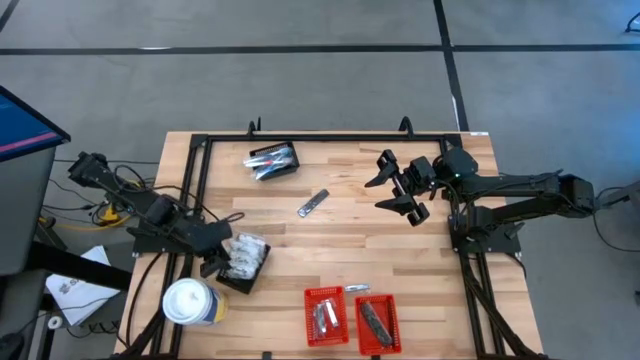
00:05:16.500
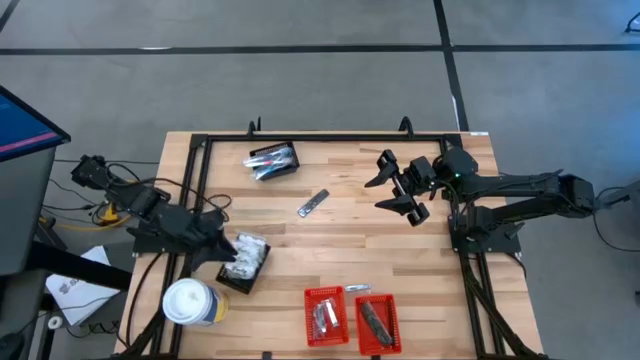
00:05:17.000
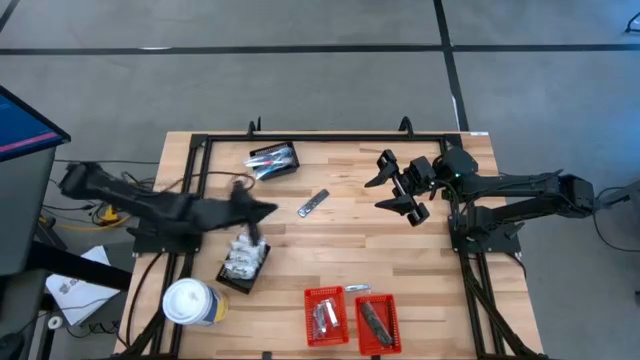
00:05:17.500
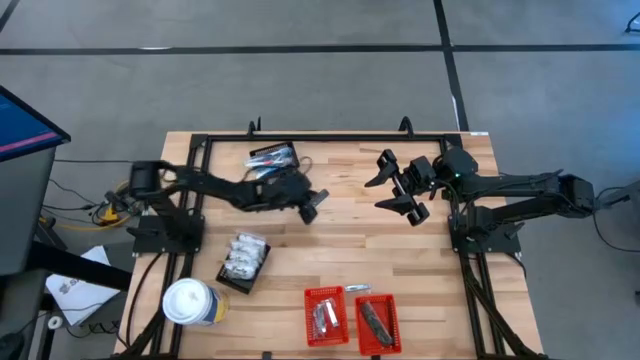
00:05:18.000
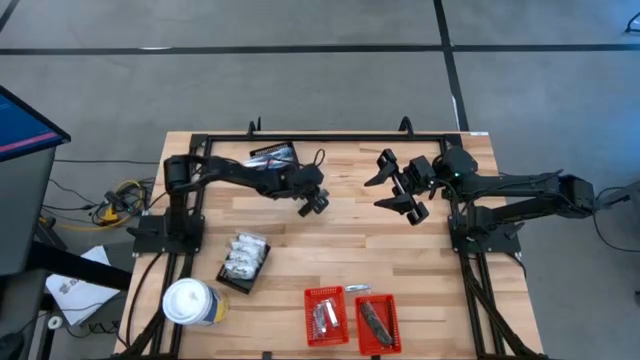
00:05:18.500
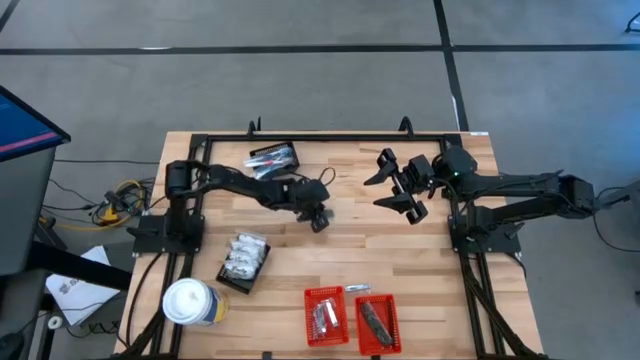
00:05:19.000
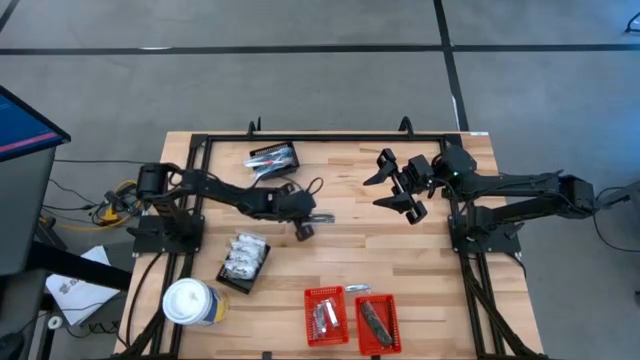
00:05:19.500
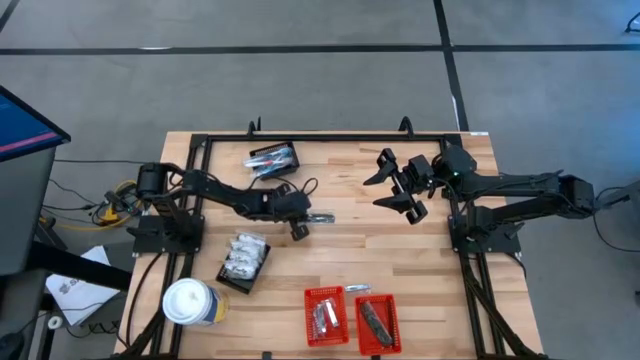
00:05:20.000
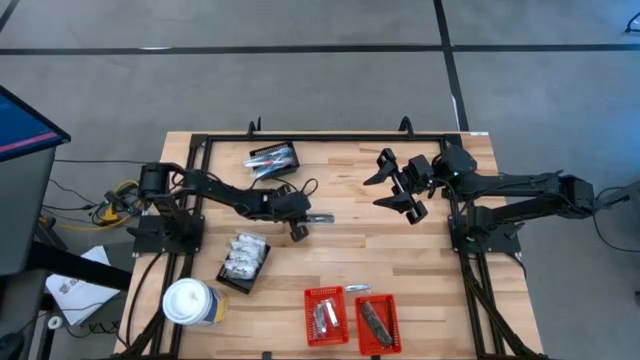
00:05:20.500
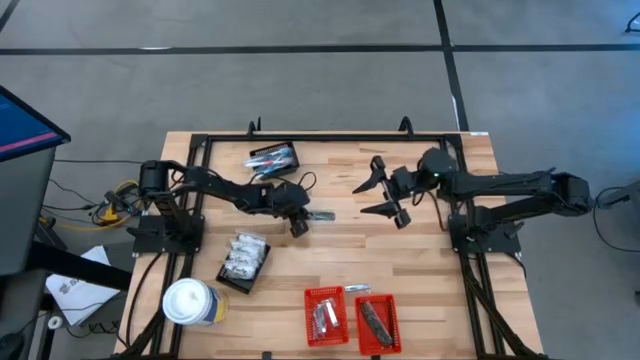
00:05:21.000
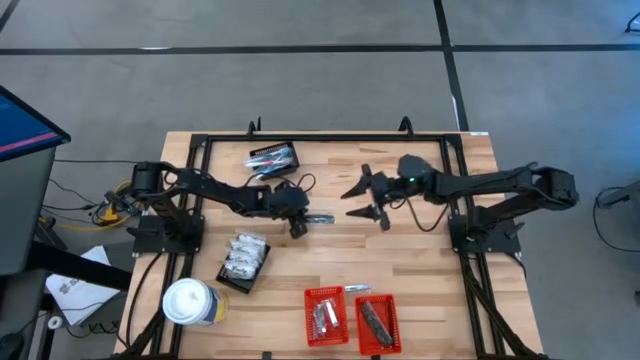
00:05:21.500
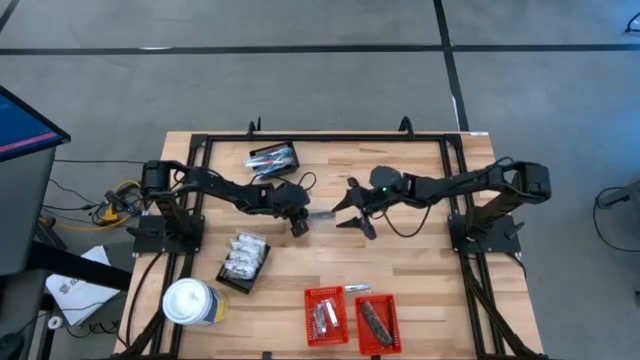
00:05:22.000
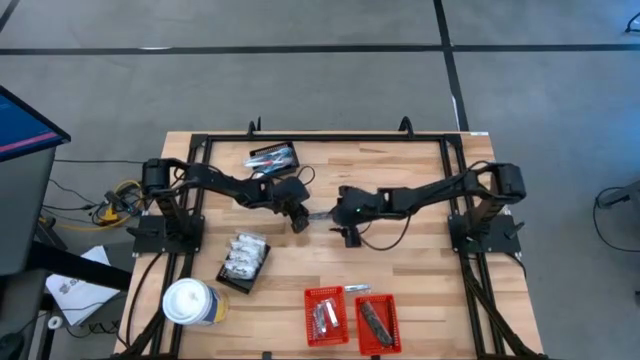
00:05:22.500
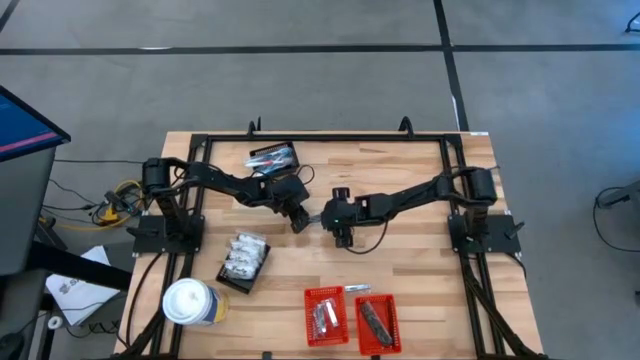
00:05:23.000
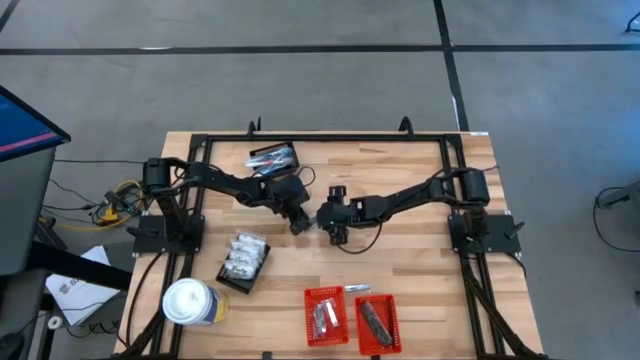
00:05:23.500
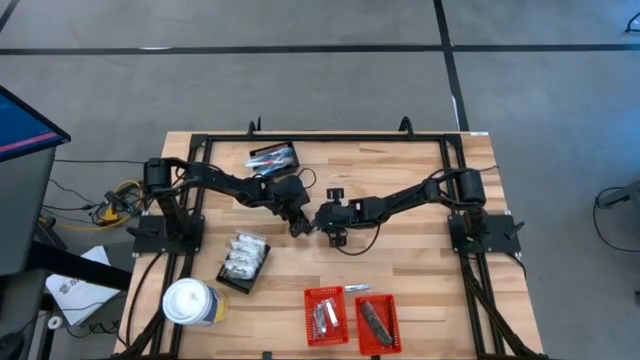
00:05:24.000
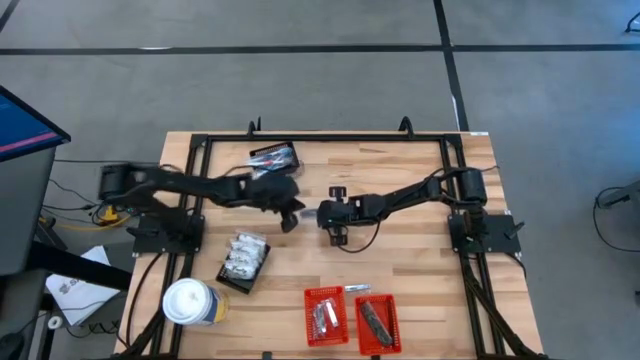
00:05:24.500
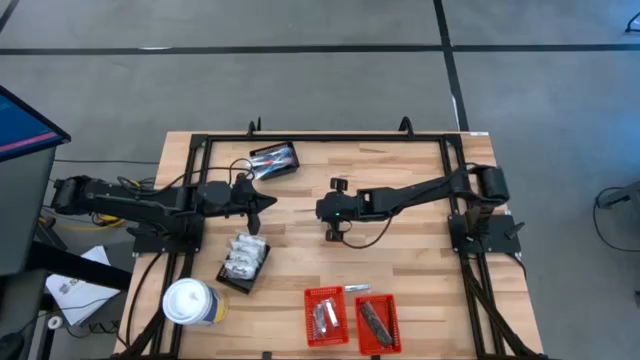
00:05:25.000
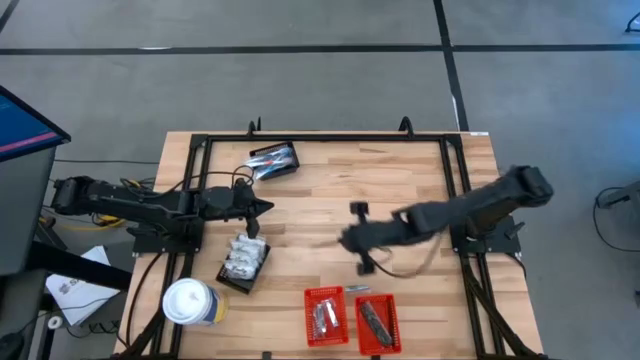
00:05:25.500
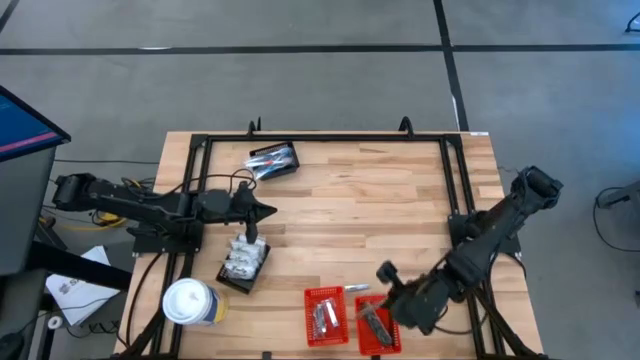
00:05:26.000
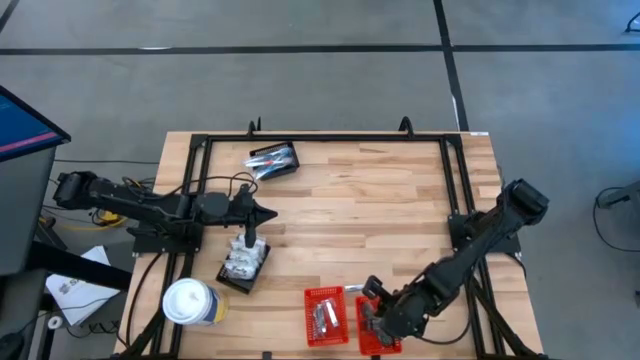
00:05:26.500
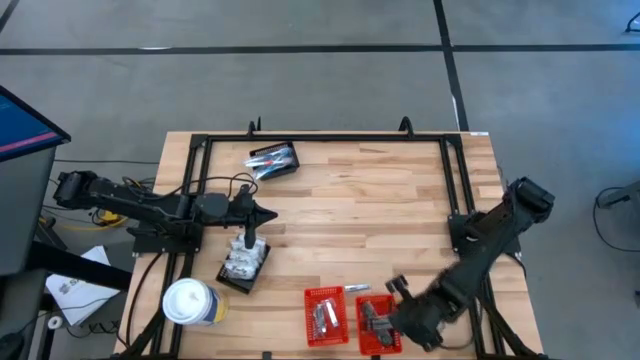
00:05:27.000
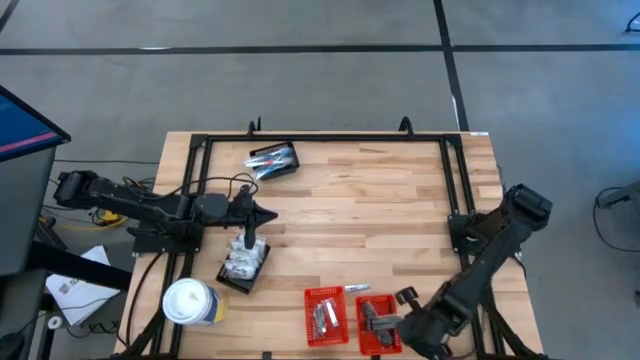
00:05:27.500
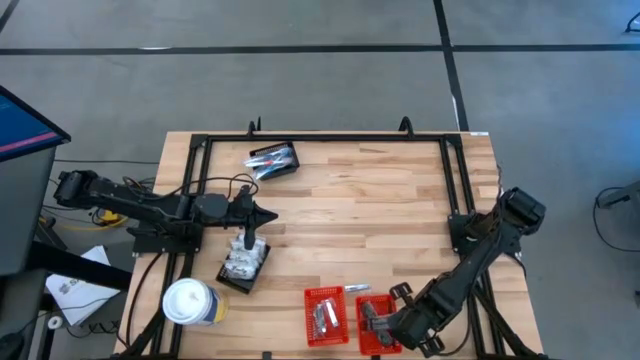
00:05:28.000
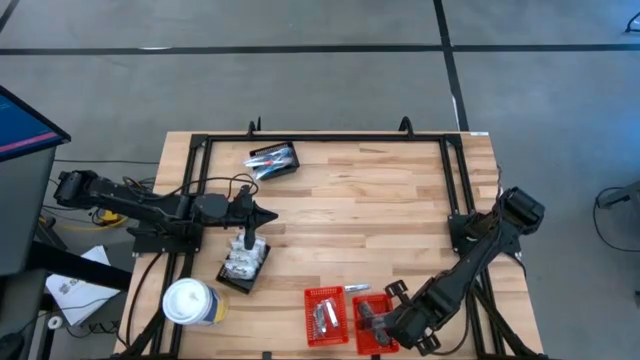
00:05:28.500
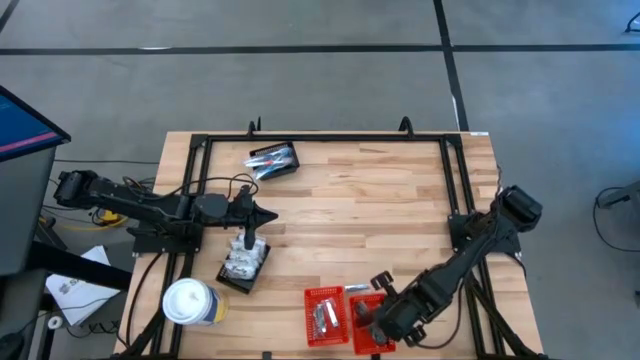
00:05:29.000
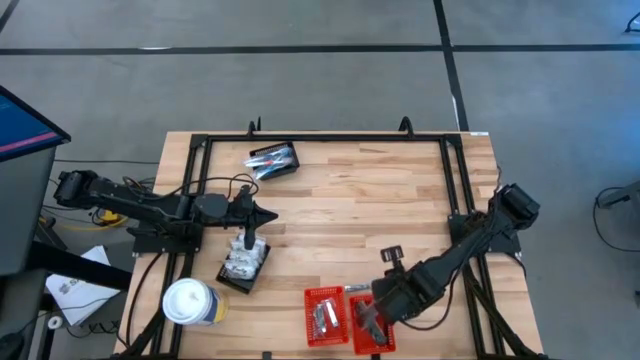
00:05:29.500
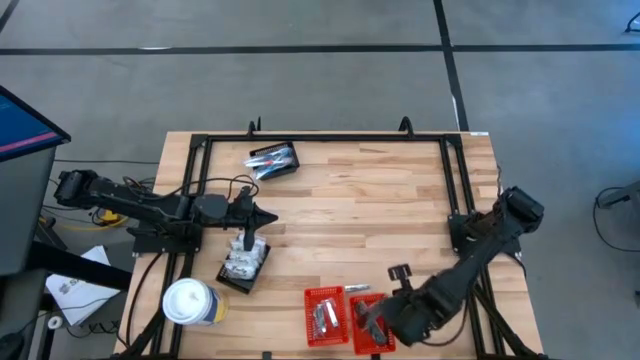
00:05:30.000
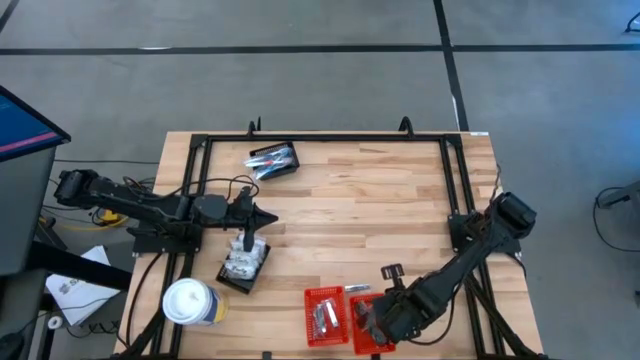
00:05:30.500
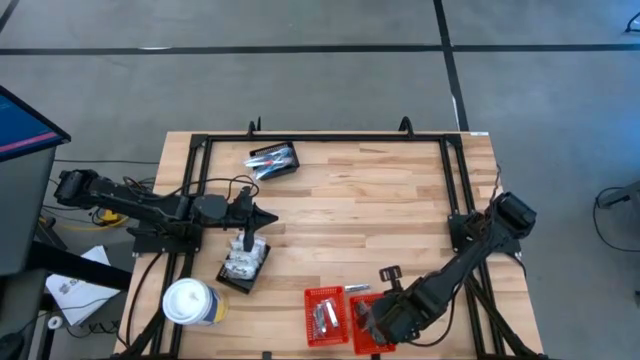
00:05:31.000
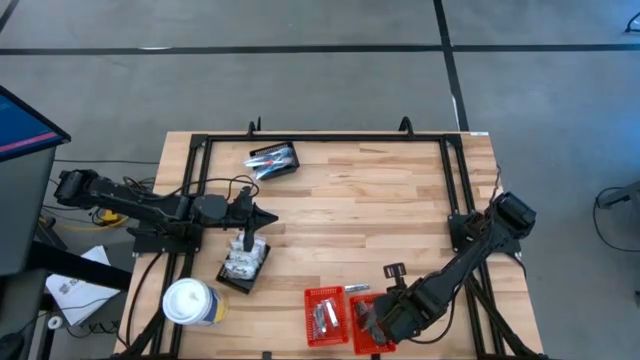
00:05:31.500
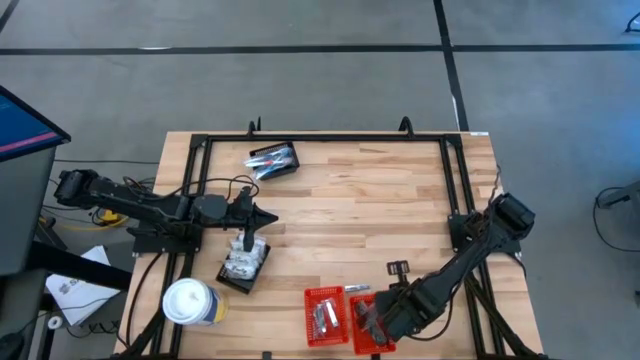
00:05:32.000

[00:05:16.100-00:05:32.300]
Task: Pick & Place Travel size toiletries
Put the black hair brush into the right red bin

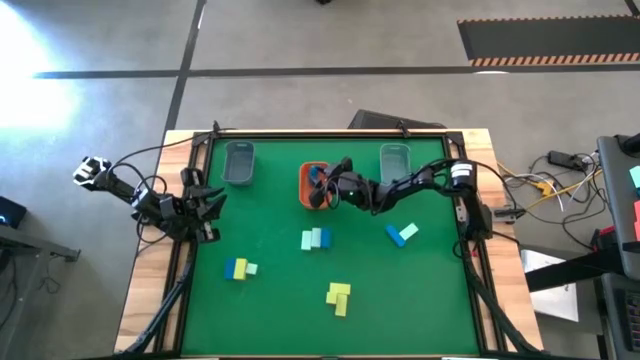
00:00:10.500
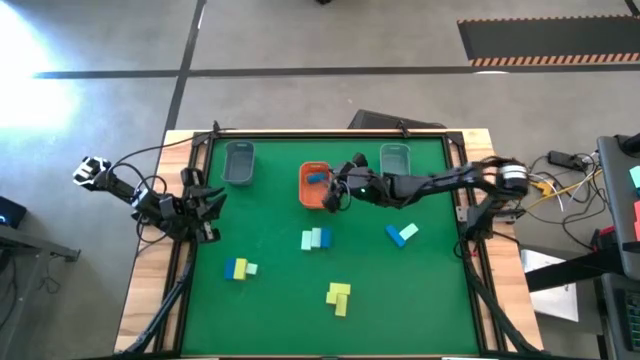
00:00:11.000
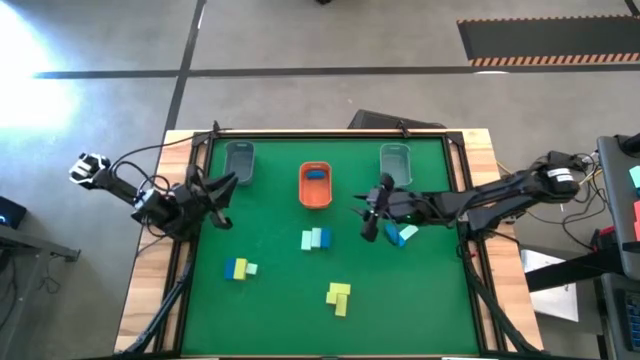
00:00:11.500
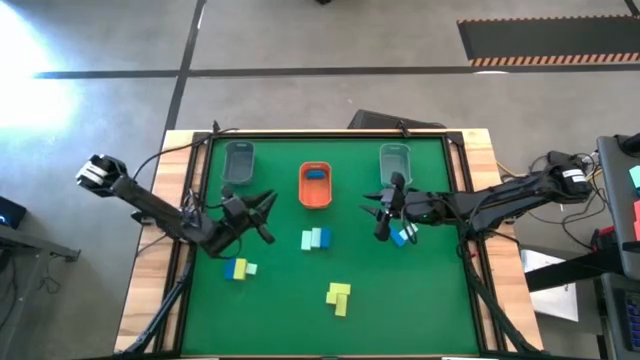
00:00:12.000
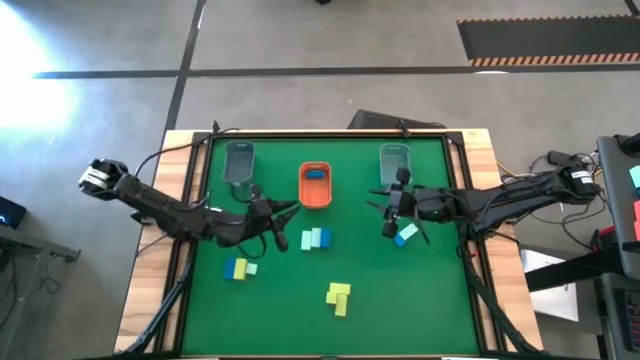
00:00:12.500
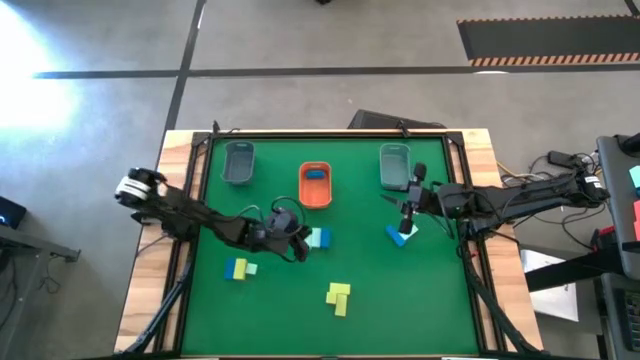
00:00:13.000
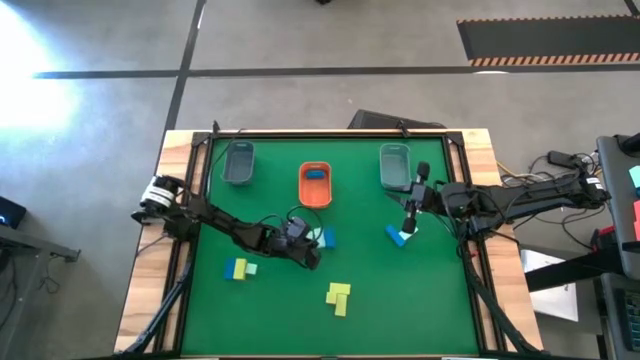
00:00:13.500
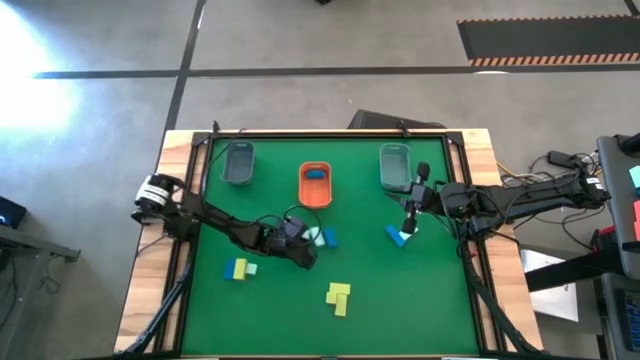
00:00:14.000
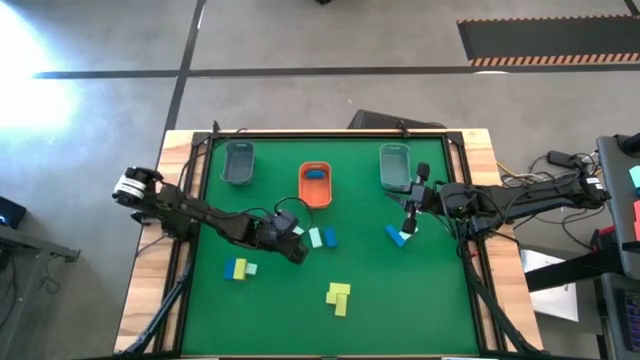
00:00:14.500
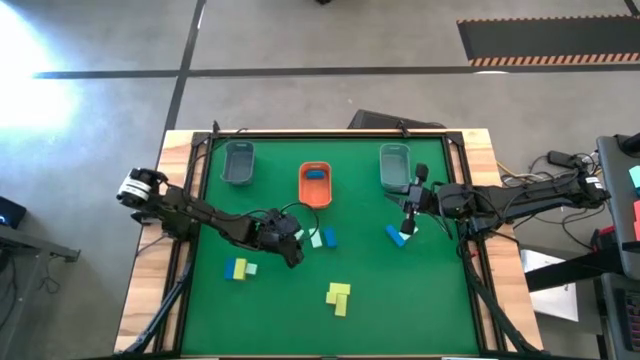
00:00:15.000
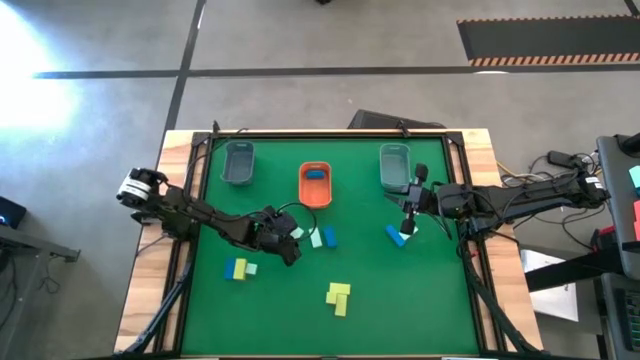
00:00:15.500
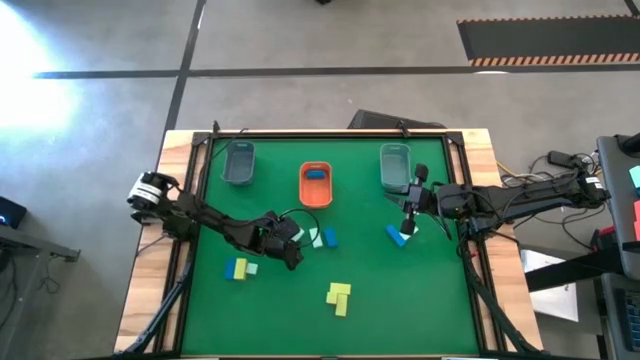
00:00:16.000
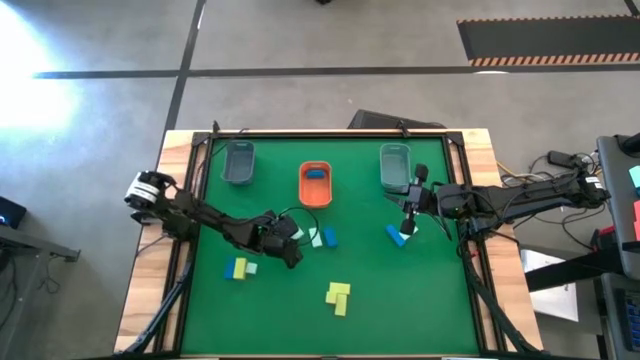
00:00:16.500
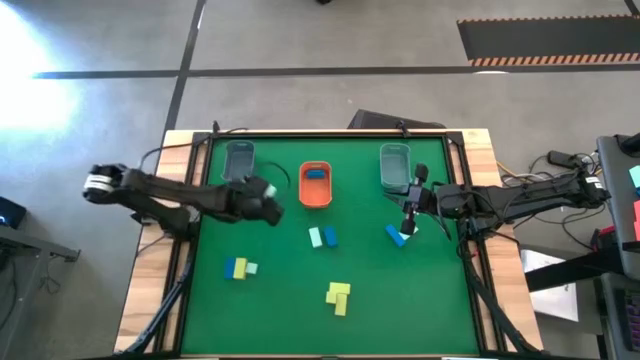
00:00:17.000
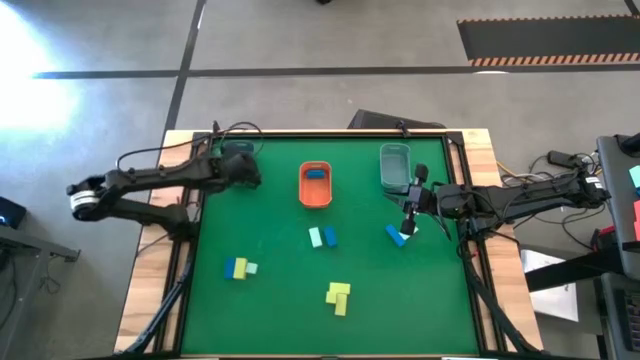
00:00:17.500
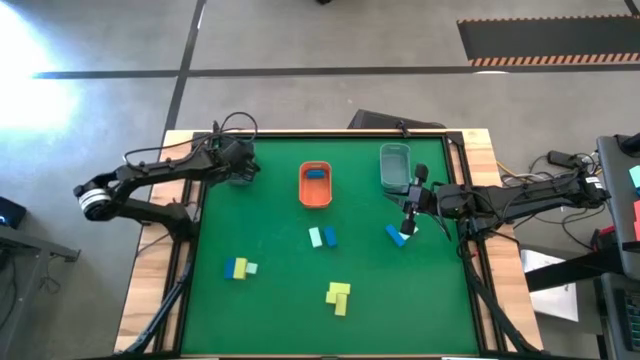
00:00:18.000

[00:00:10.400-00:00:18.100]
Task: Sort & place blocks by color
Put the light blue wooden block into the gray bin
